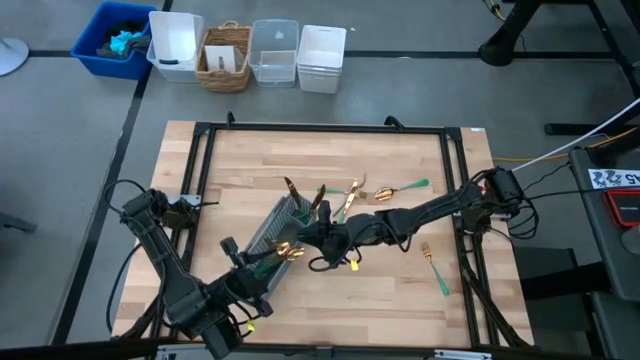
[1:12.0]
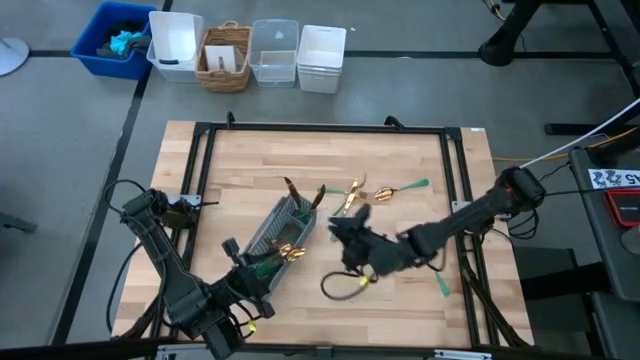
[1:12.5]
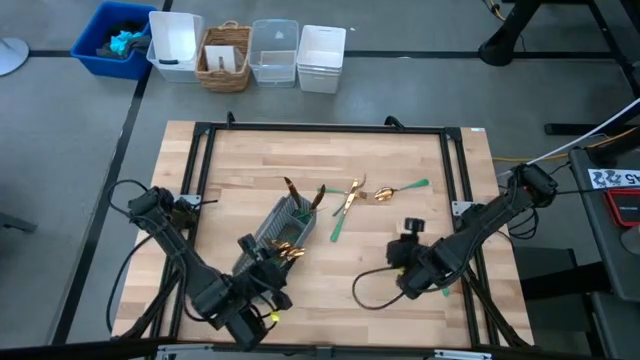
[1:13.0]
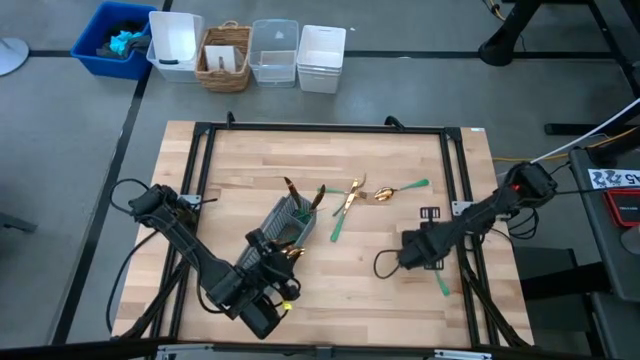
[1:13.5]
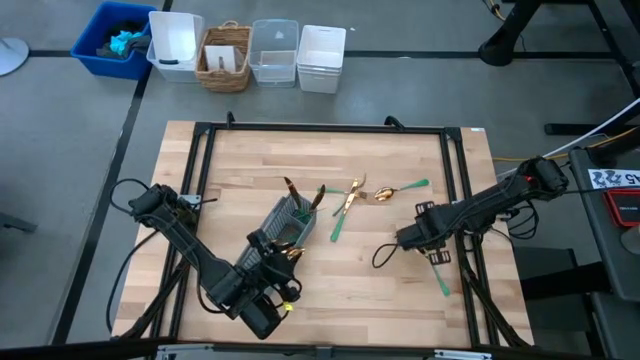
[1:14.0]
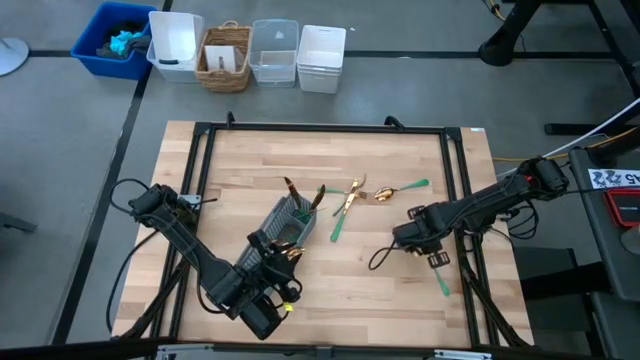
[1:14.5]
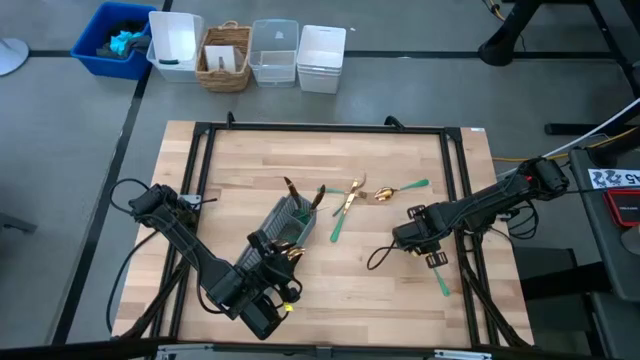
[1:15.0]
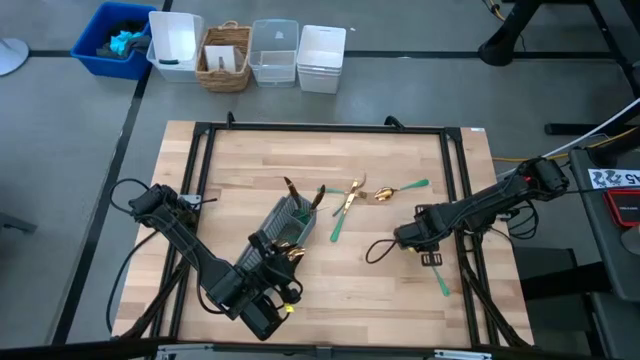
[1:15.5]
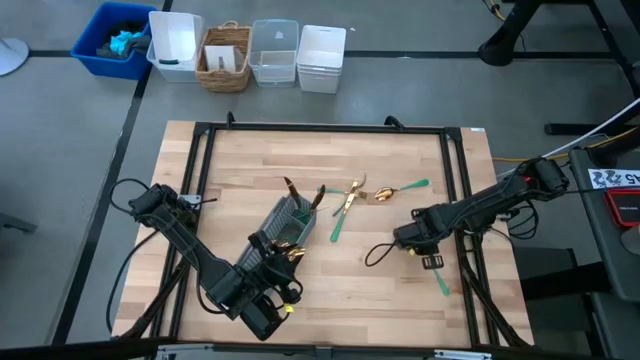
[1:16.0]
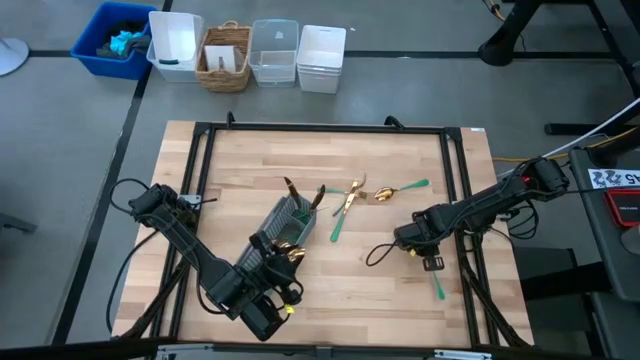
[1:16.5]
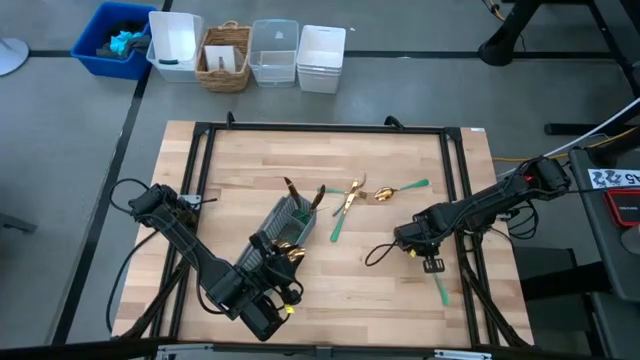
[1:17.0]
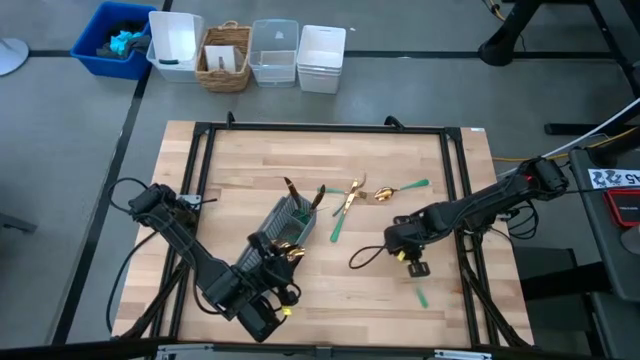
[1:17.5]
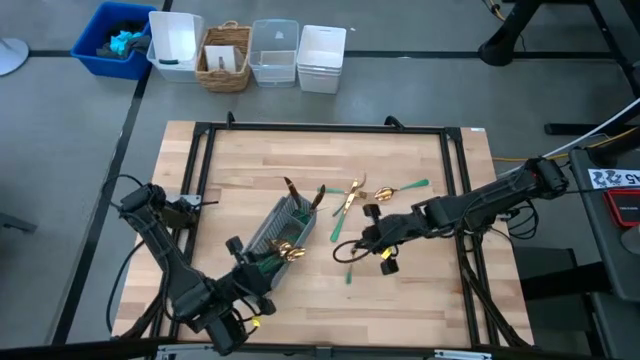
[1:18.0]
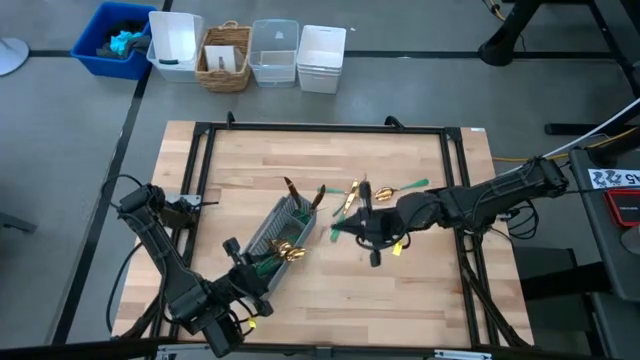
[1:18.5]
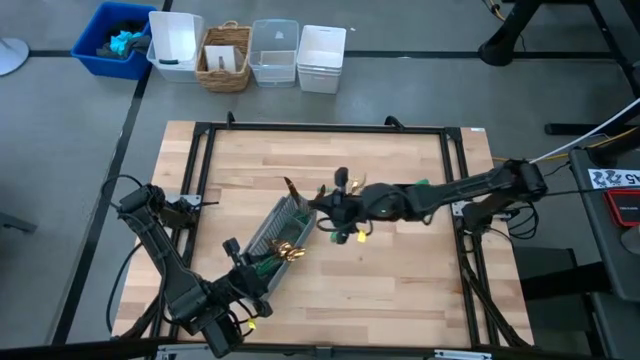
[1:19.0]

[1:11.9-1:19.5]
Task: Sort silverware
Put the green fork into the silverware basket

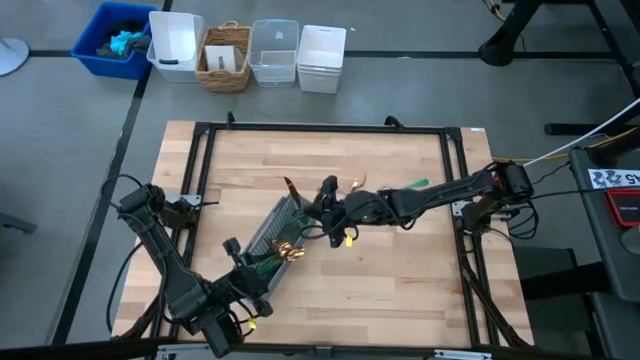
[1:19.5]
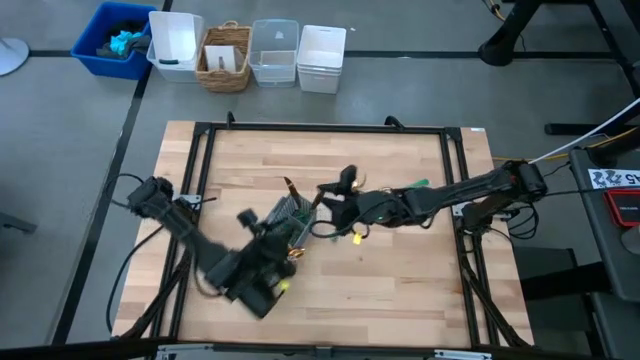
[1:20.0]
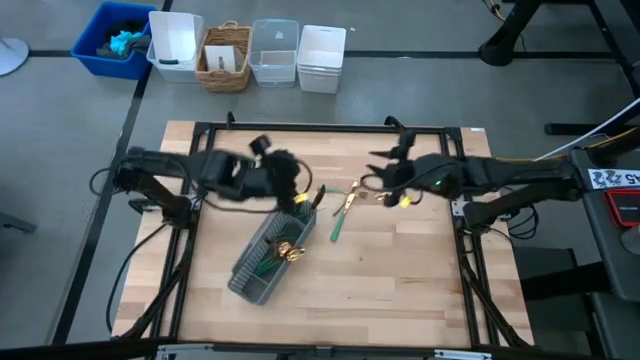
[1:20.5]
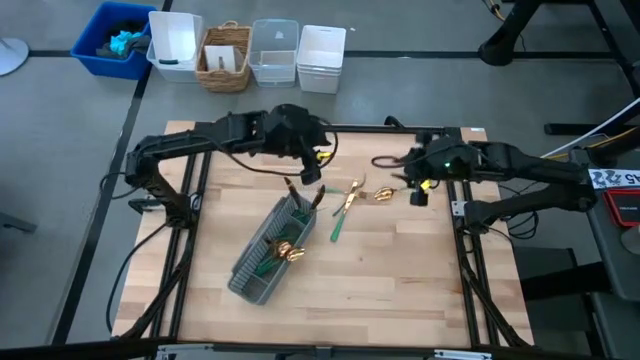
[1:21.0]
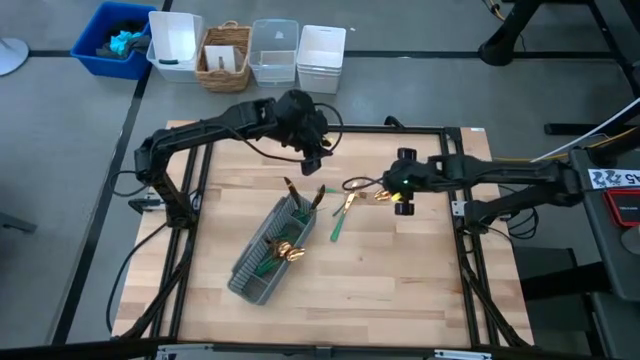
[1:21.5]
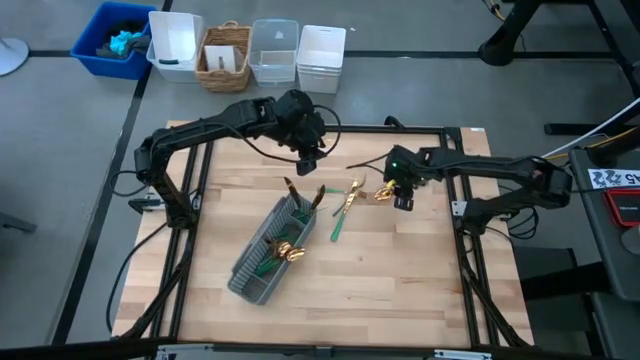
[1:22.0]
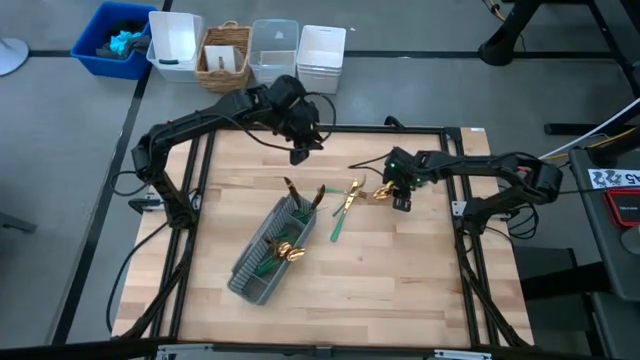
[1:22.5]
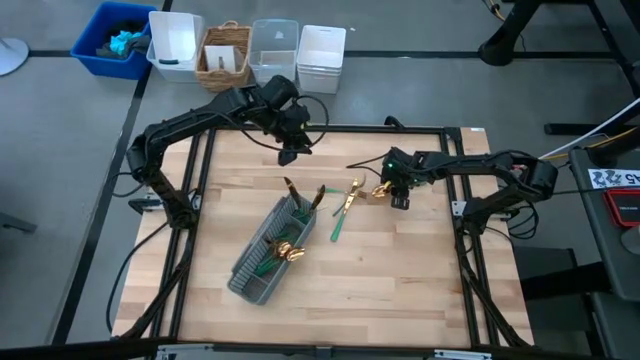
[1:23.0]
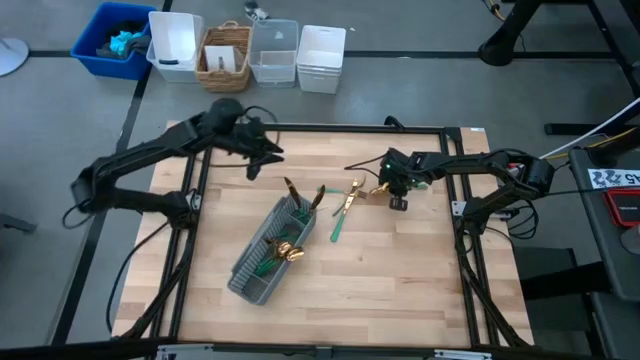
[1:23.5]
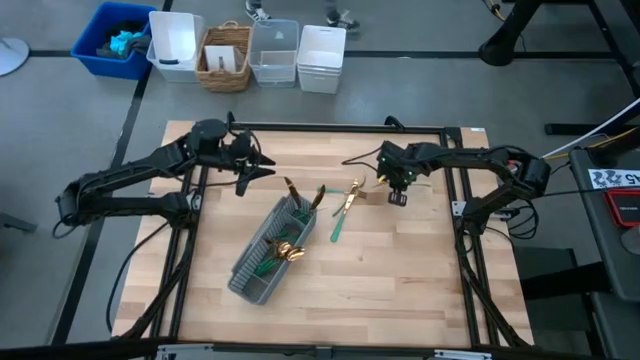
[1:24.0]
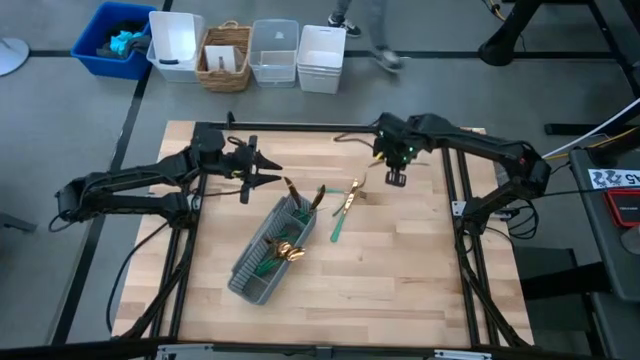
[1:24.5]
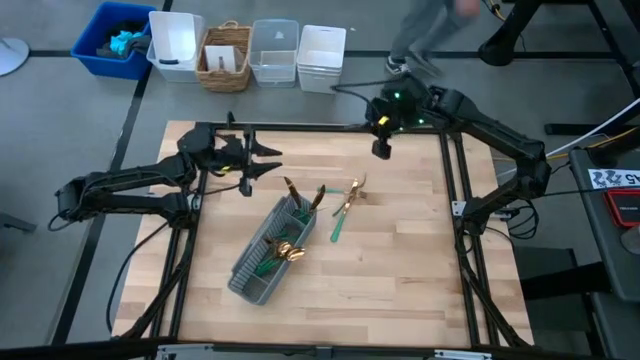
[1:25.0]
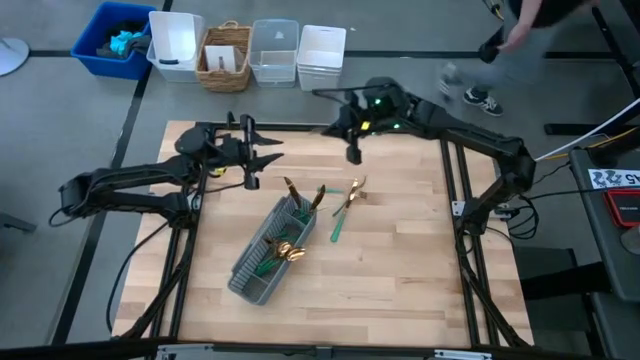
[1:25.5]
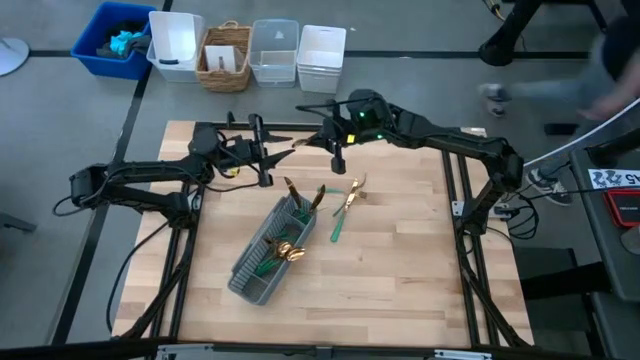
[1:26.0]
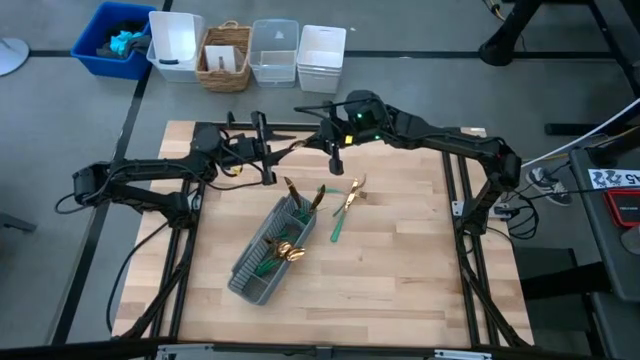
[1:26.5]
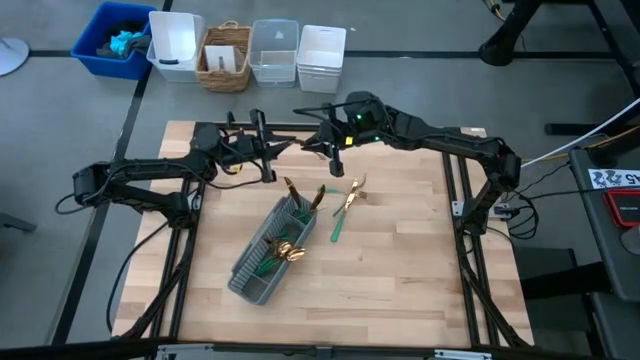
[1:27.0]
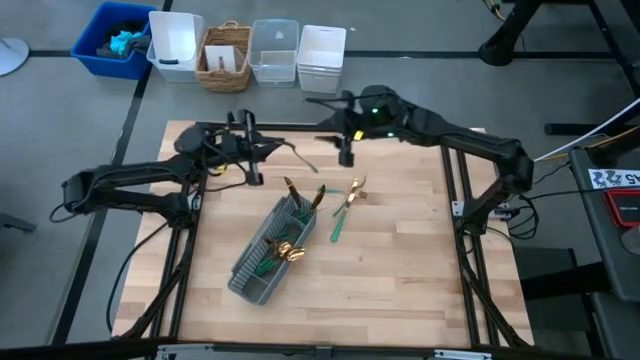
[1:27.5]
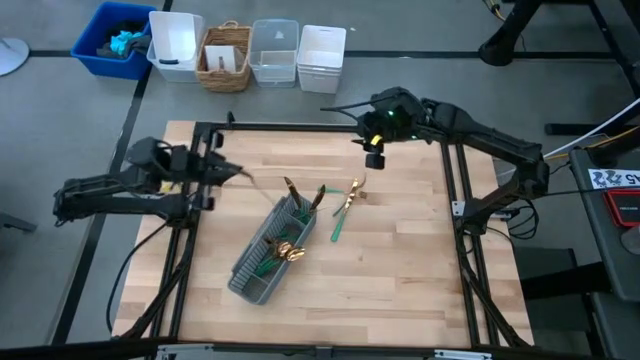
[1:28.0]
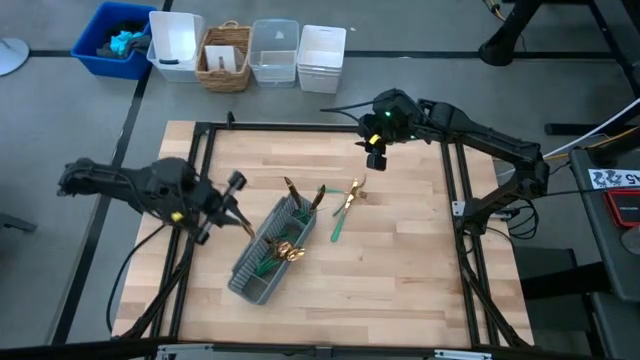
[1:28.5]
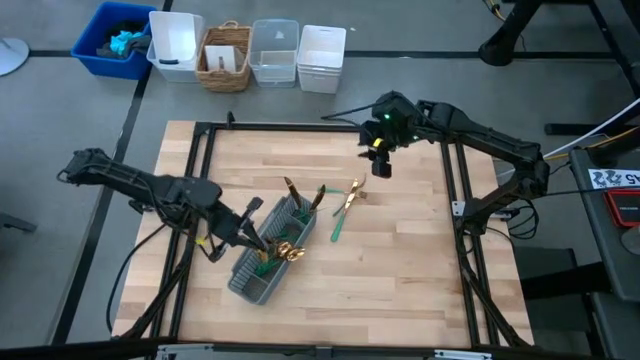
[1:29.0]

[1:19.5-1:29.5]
Put the green spoon into the silverware basket

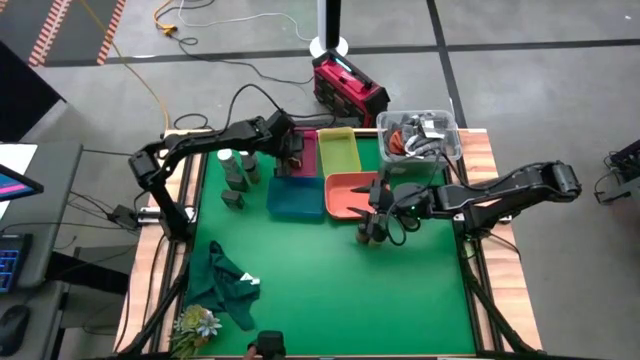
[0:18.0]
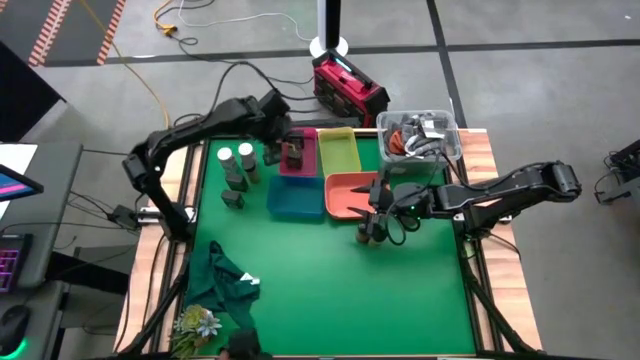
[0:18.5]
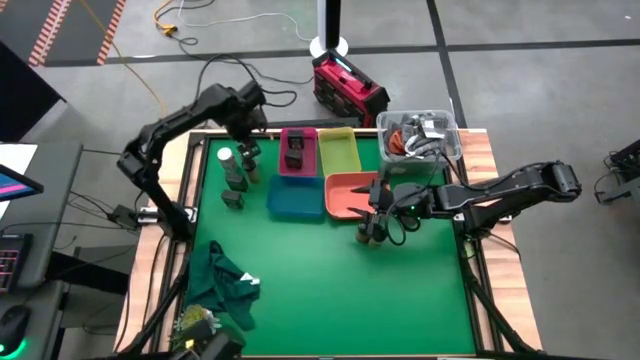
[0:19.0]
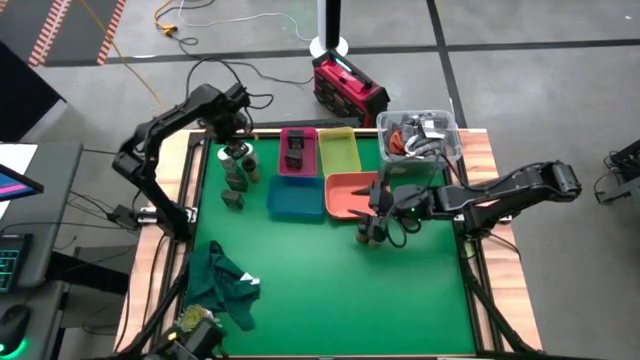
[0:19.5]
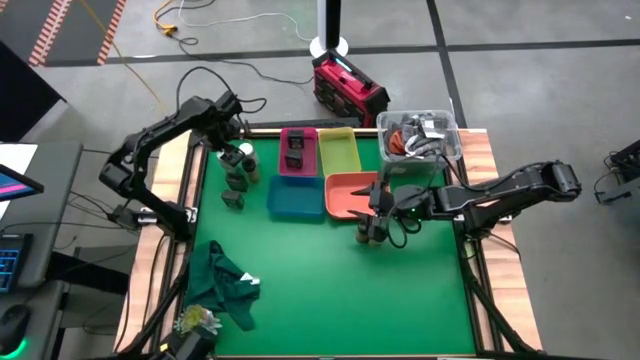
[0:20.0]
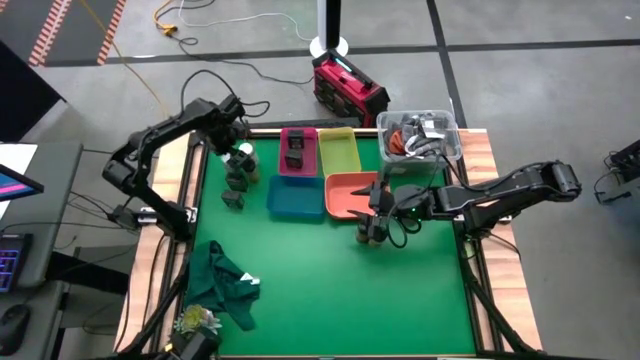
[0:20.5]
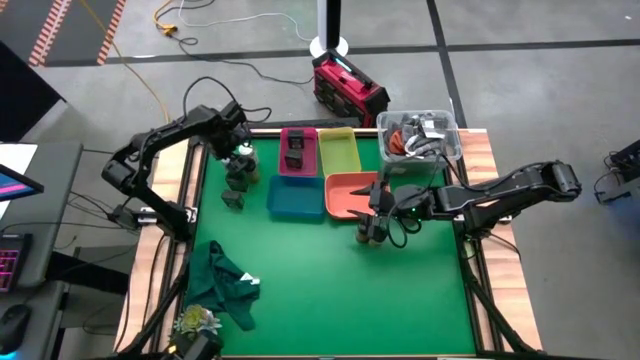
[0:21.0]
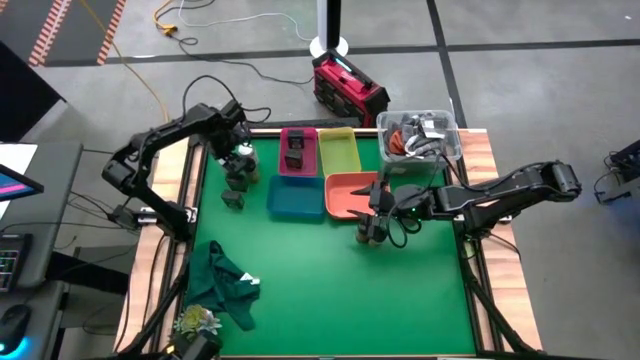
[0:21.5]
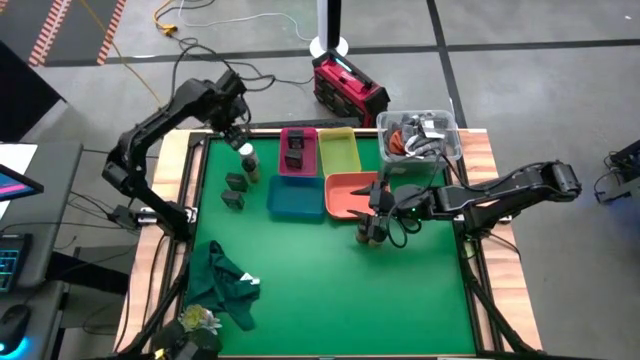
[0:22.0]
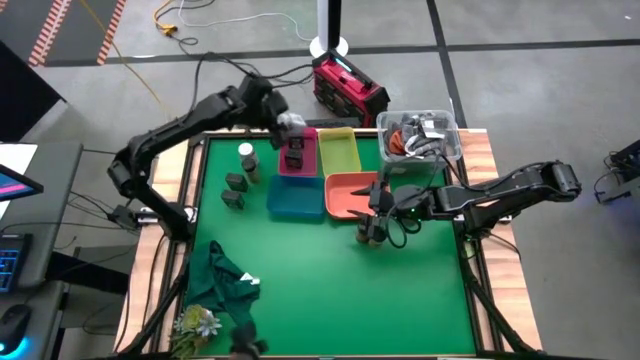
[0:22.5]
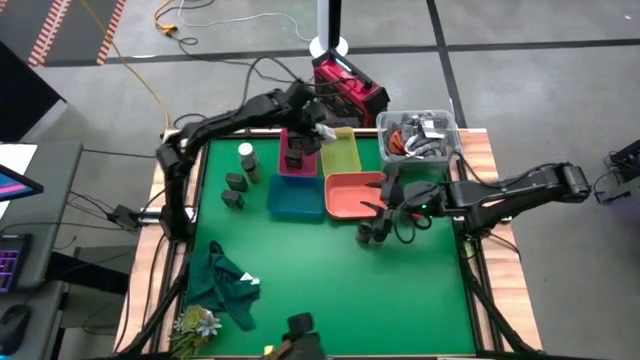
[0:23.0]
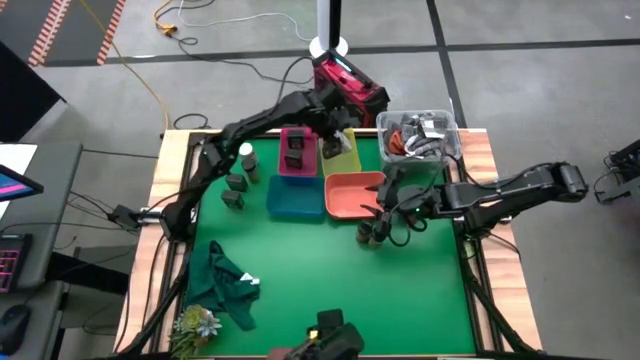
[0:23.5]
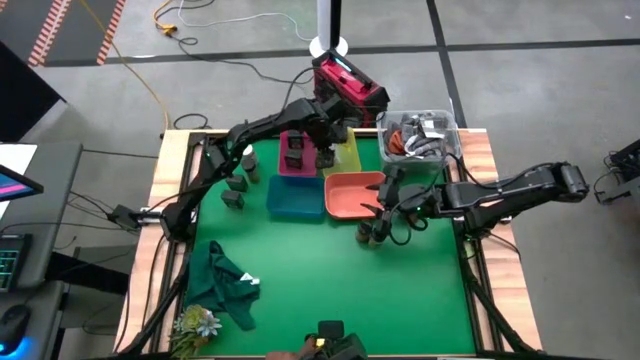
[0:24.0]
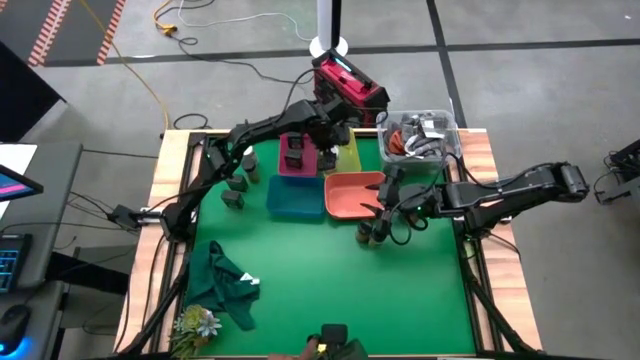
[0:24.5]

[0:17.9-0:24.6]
Task: Sort spices by type
Put the left white seasoning bottle into the yellow bin
